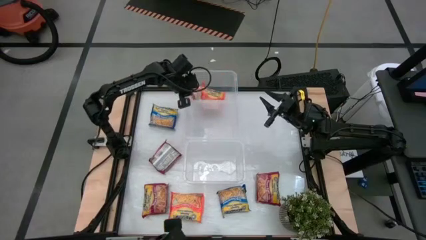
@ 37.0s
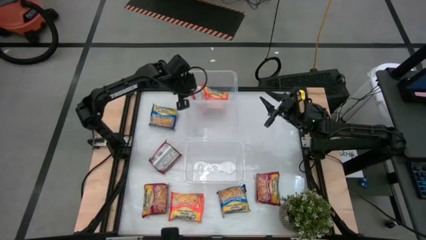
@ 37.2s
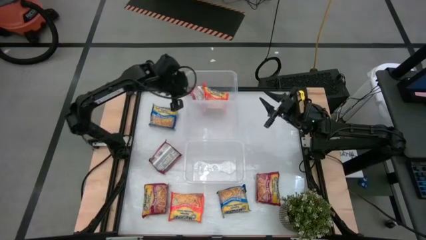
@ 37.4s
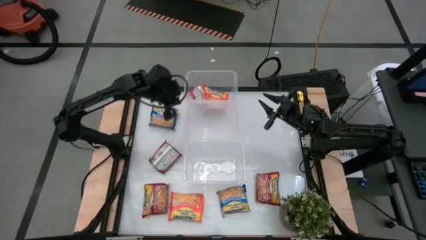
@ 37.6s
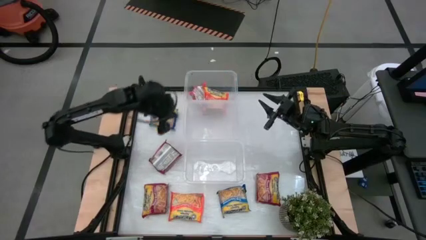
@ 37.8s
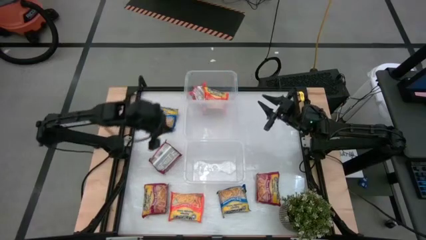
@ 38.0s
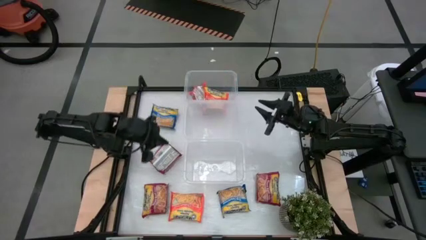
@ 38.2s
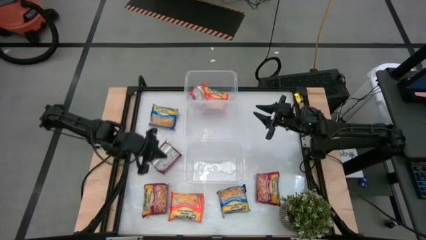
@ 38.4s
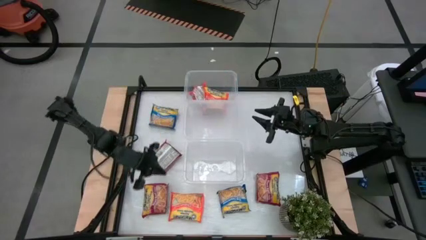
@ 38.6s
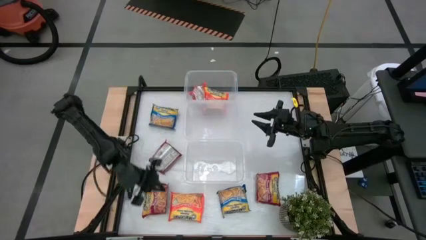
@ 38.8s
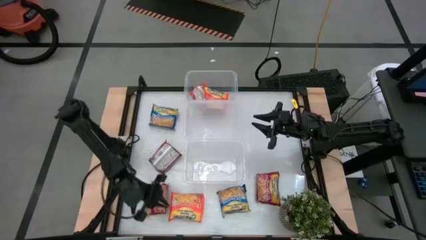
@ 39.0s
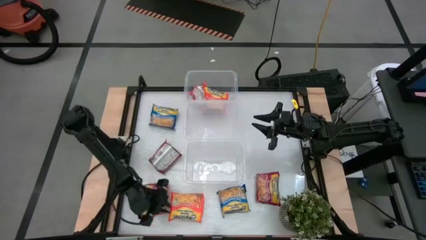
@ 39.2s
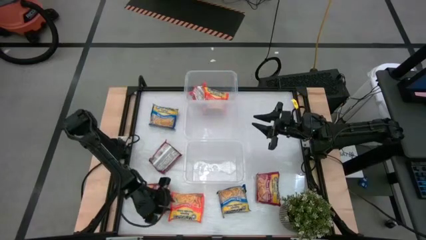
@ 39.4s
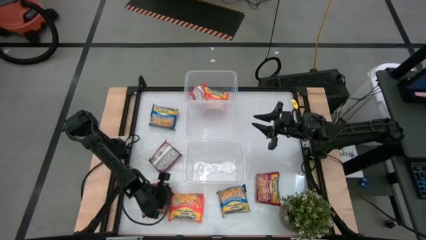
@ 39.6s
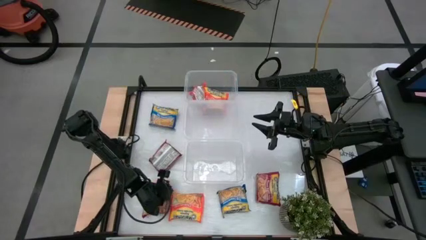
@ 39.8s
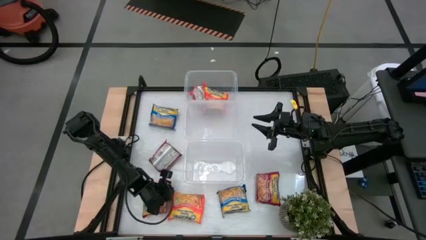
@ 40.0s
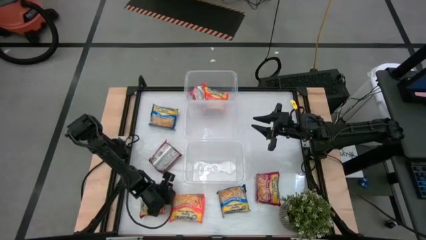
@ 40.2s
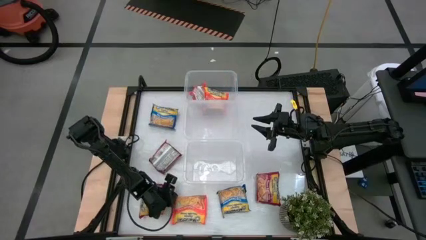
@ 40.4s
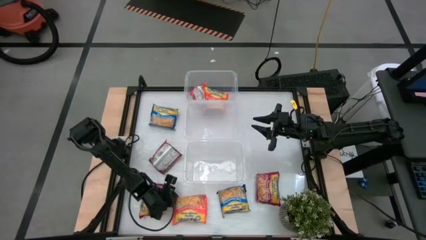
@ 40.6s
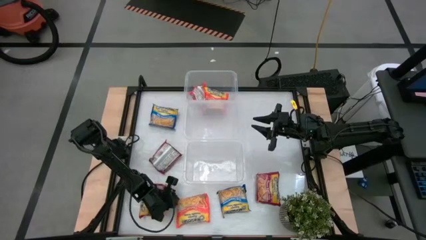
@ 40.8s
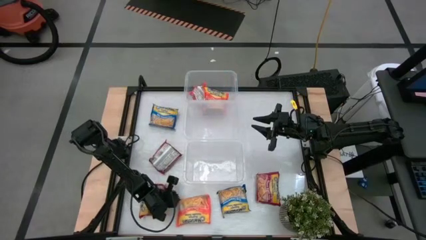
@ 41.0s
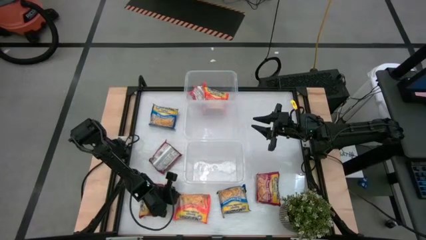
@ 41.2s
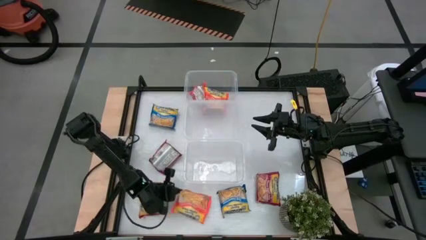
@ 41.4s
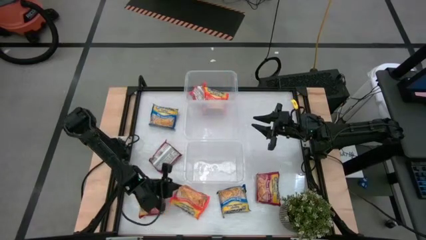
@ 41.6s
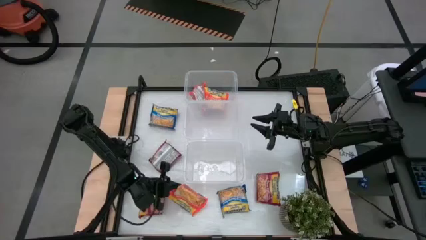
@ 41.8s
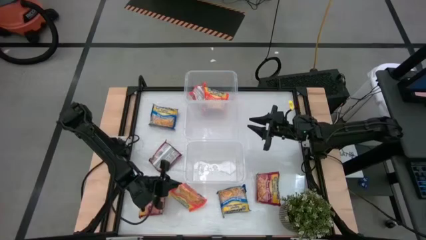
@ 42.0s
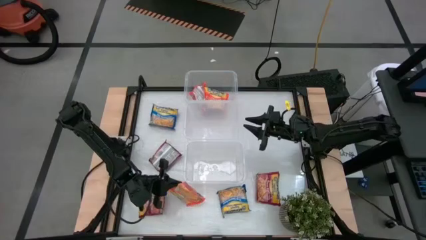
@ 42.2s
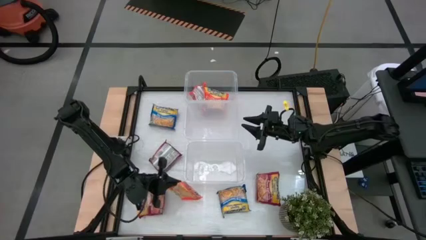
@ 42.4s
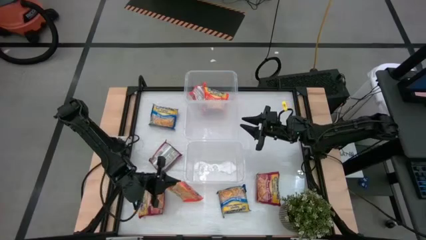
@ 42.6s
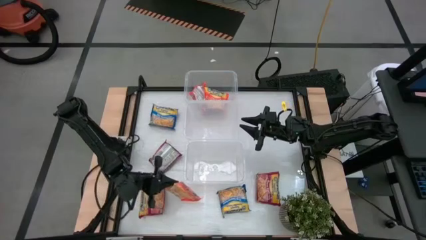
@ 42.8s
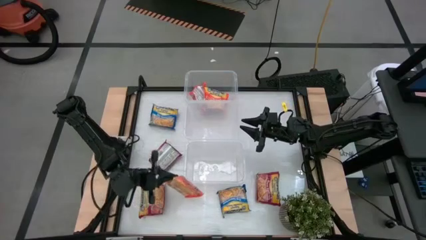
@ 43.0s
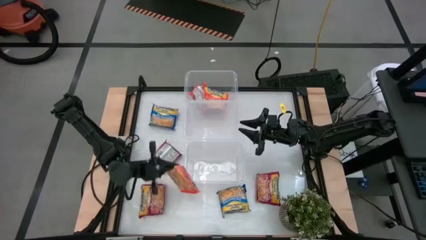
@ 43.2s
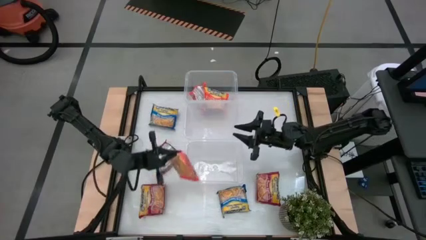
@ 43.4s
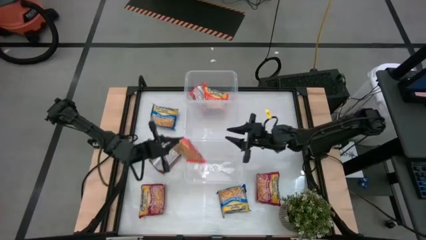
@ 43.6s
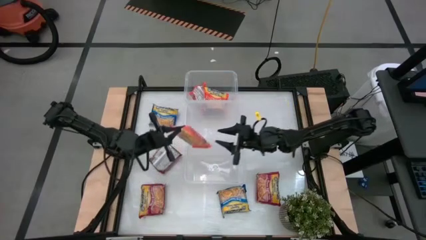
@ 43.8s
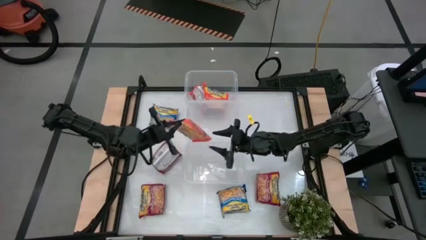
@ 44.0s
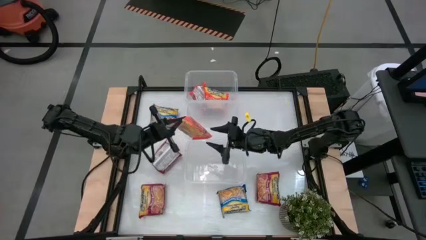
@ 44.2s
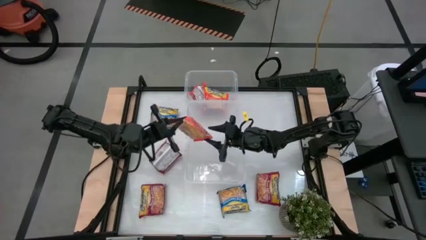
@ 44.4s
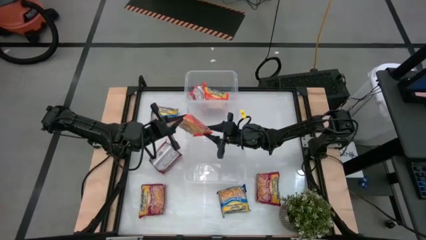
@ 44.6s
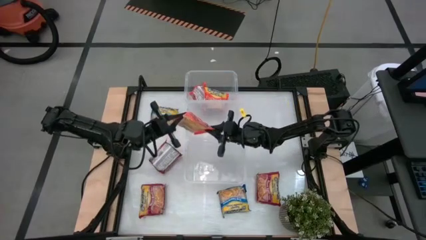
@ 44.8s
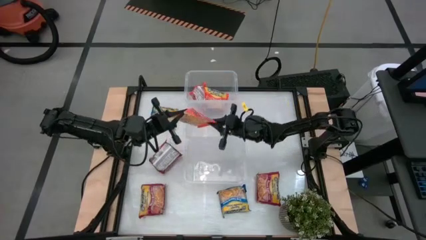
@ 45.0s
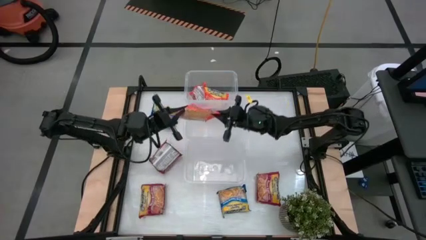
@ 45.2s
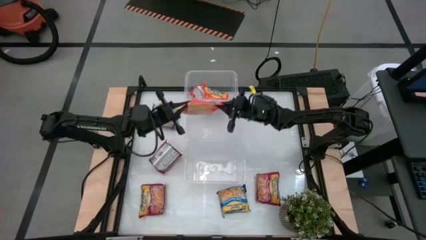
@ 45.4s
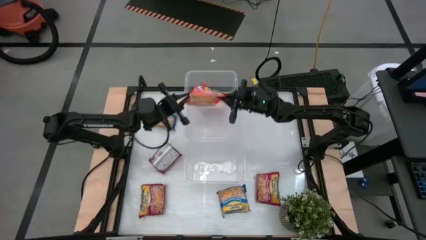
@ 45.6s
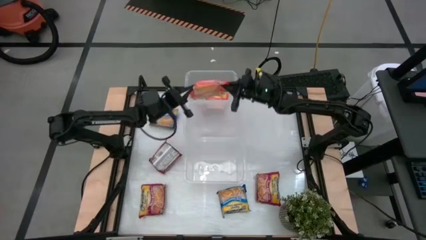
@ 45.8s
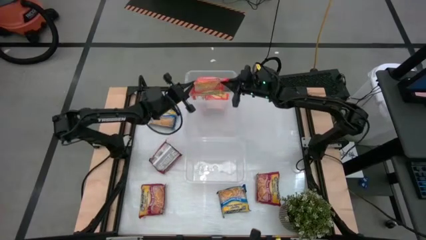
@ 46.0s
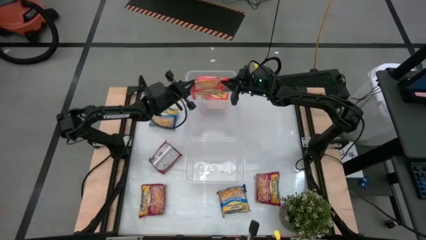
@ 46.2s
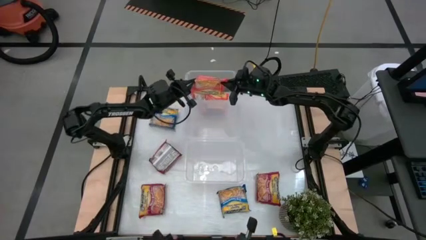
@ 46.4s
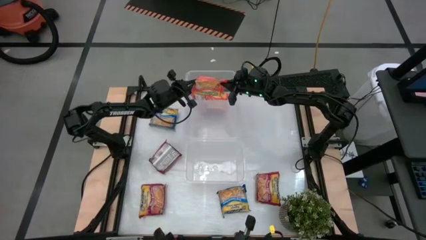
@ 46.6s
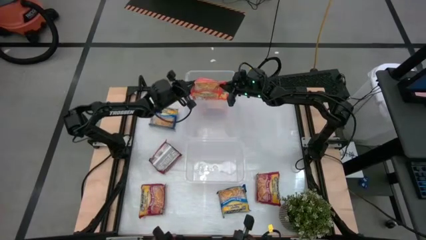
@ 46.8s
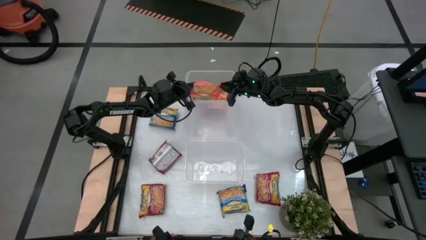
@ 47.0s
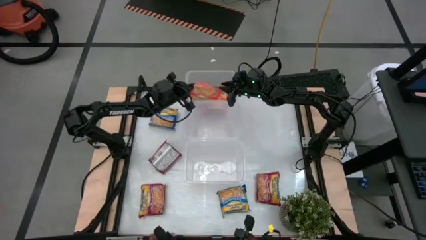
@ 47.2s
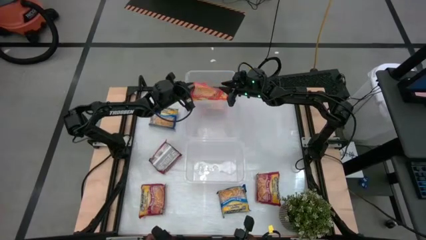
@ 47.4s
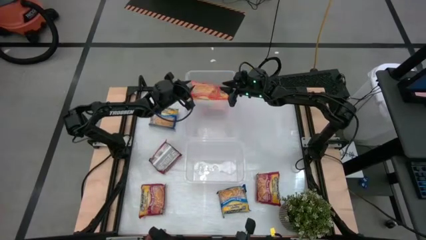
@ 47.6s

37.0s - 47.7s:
Task: Sort Maruchan noodles
Put the orange noodle pack into the top transparent bin

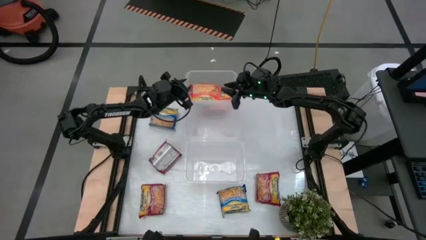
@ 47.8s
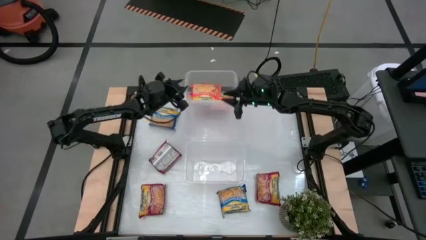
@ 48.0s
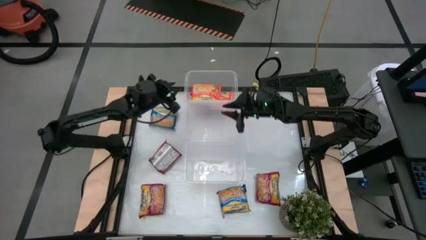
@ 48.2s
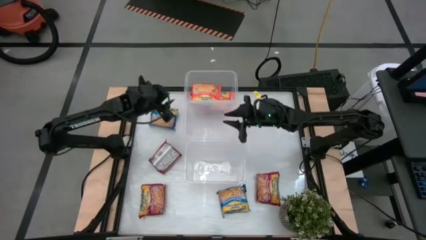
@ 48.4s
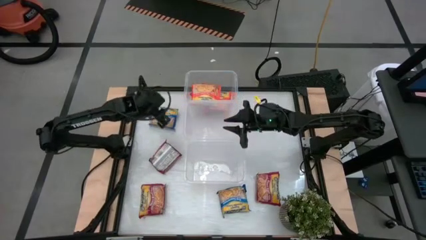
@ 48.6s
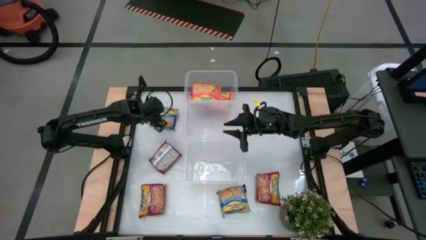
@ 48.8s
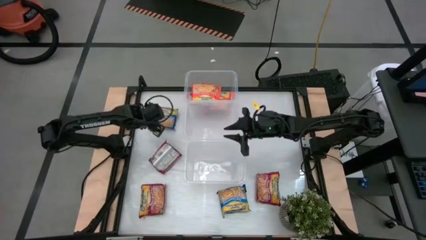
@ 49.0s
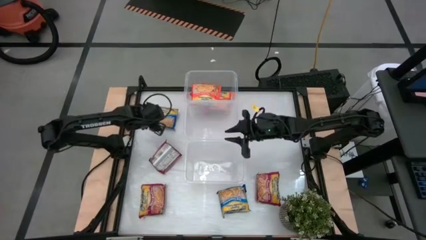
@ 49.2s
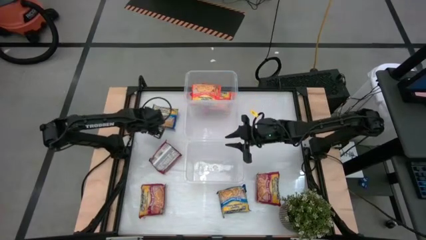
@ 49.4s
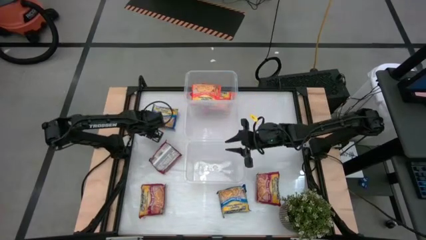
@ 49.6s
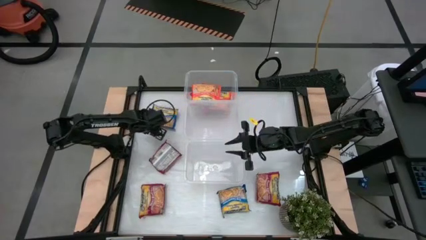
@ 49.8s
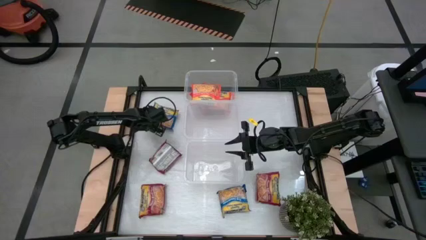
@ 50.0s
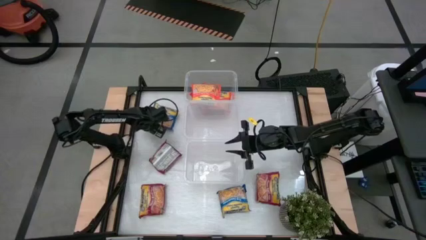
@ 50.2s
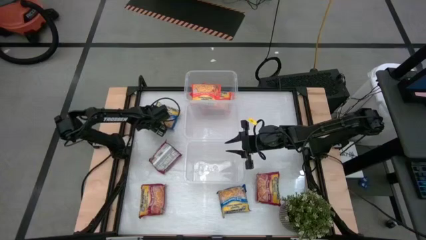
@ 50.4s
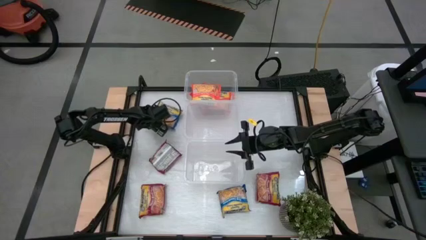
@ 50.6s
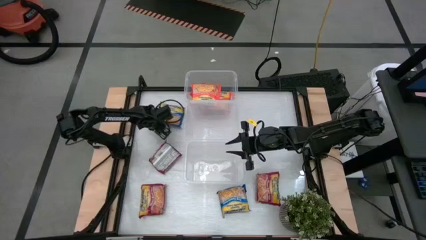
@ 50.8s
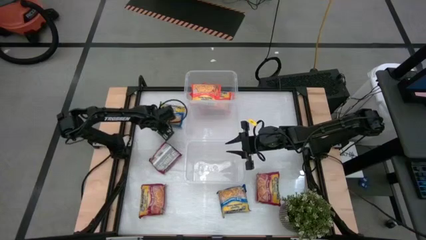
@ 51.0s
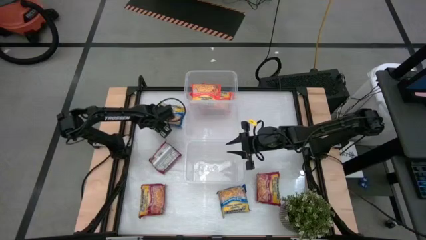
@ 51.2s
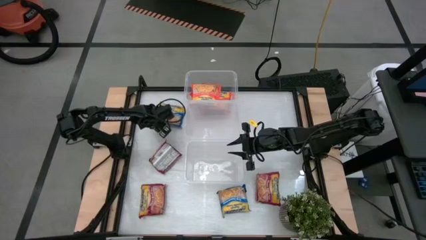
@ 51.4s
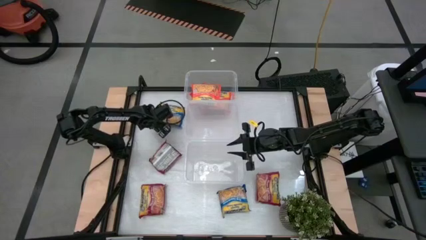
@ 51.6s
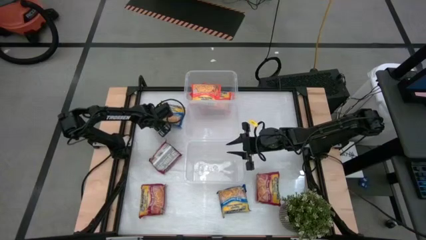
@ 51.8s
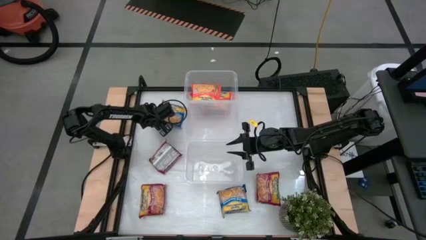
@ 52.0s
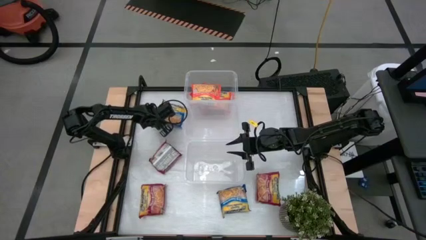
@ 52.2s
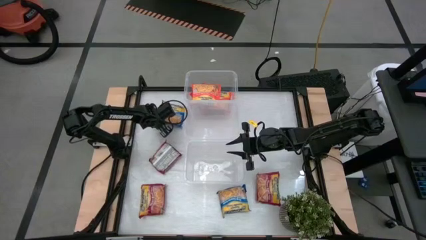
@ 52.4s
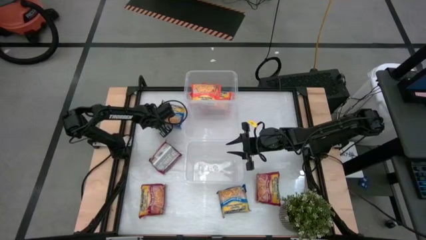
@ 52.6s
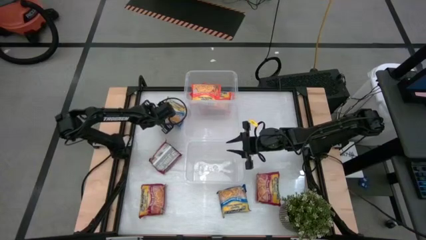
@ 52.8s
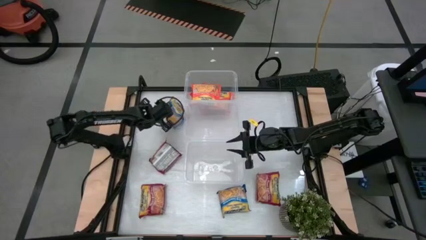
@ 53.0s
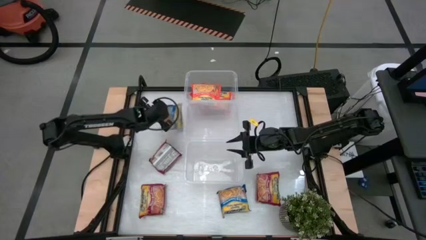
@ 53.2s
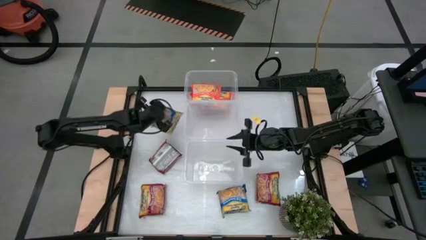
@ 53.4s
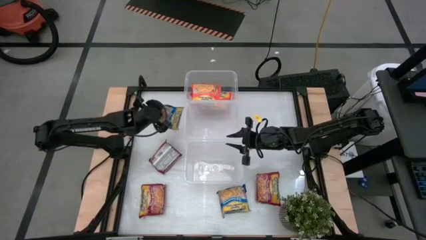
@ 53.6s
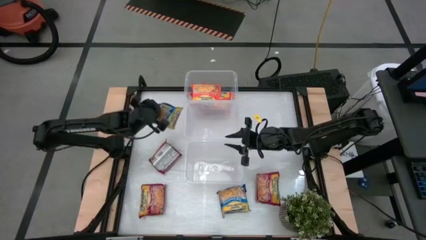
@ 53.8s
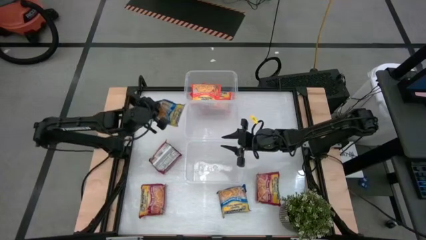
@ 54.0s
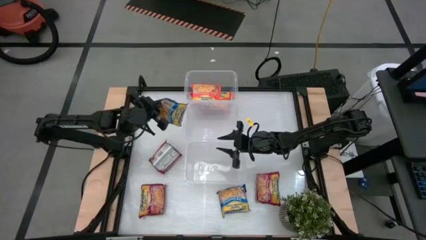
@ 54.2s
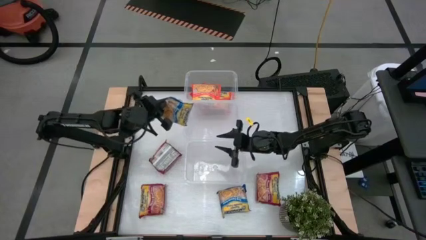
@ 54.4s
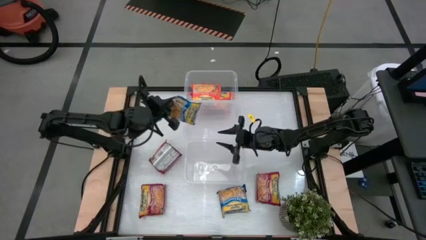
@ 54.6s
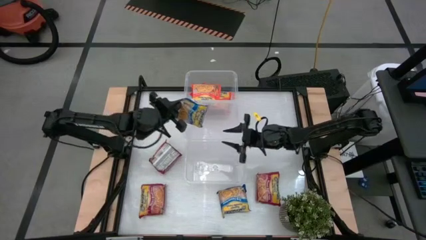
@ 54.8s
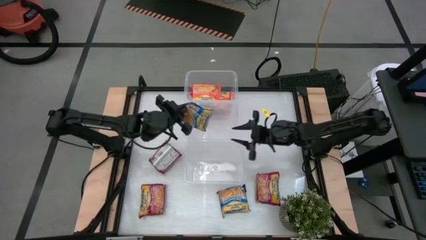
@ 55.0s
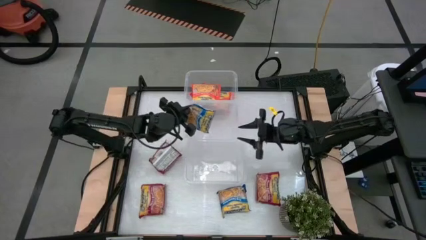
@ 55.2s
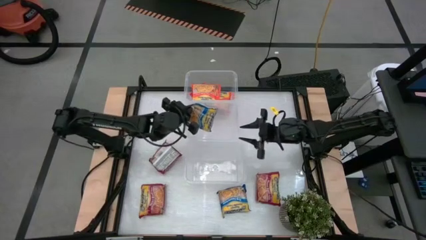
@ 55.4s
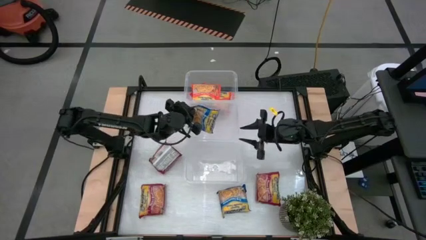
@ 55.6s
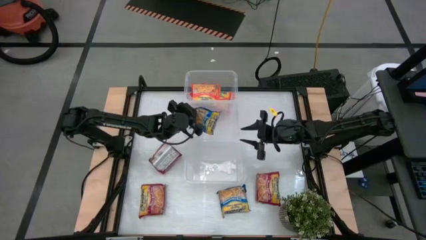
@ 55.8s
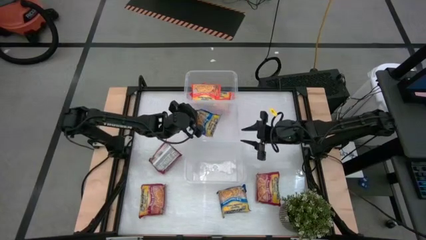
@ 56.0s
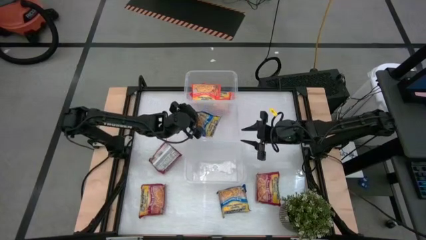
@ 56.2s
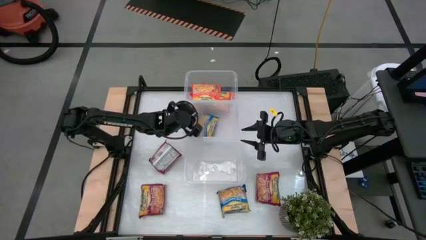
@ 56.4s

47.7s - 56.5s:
Put the top blue noodle pack into the middle transparent bin
